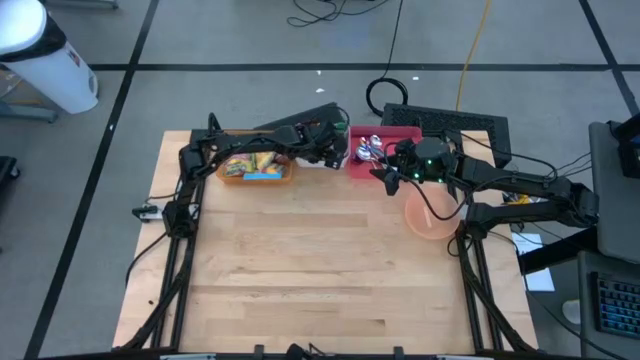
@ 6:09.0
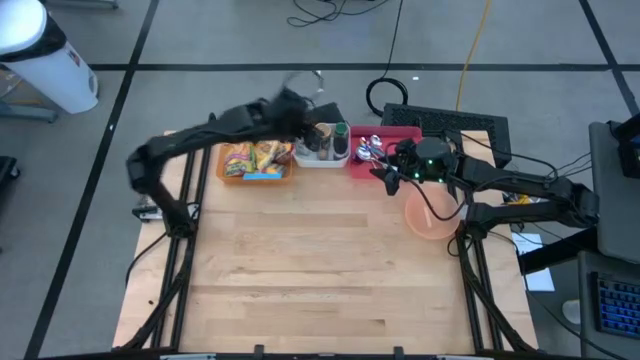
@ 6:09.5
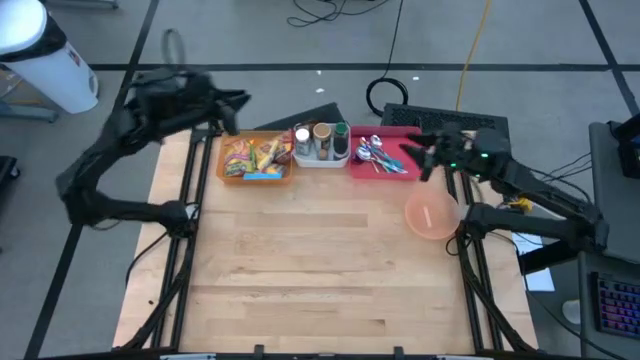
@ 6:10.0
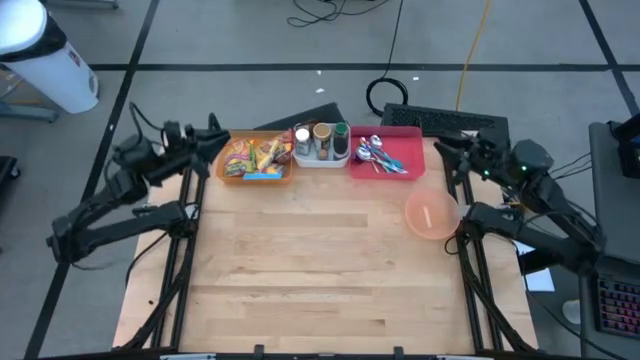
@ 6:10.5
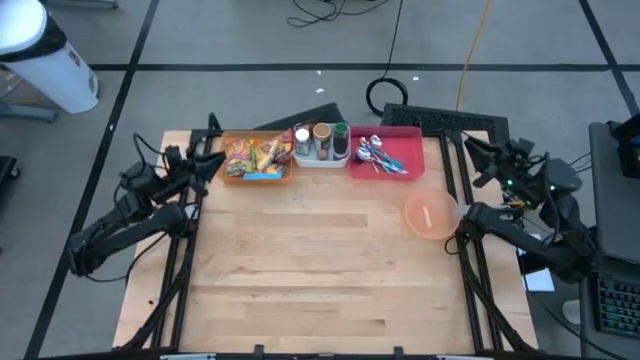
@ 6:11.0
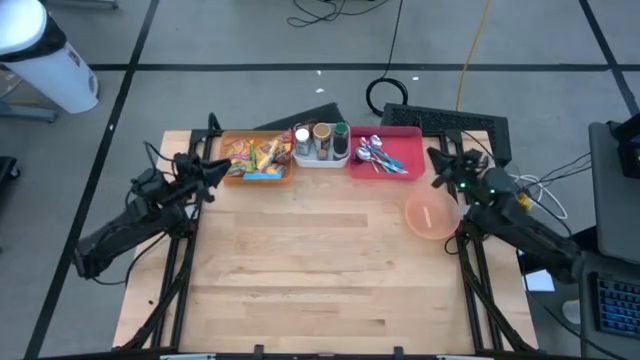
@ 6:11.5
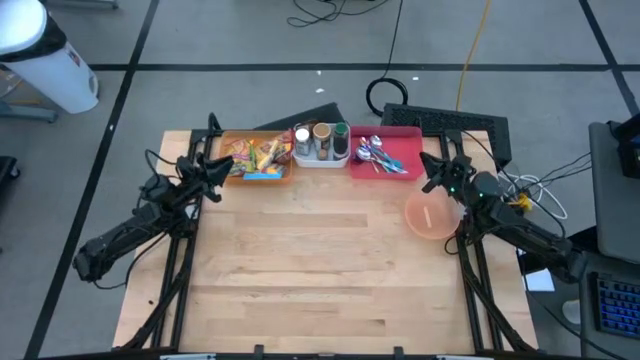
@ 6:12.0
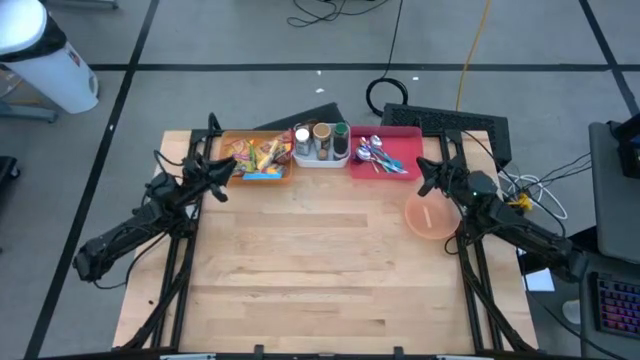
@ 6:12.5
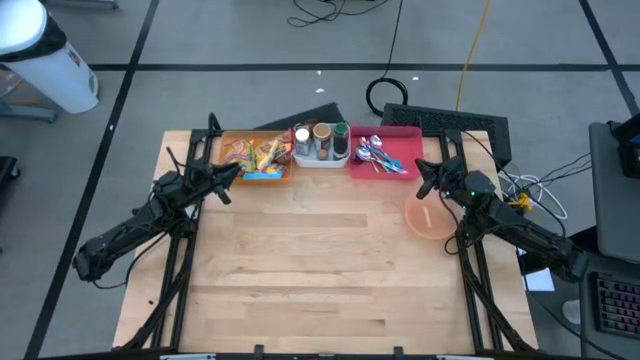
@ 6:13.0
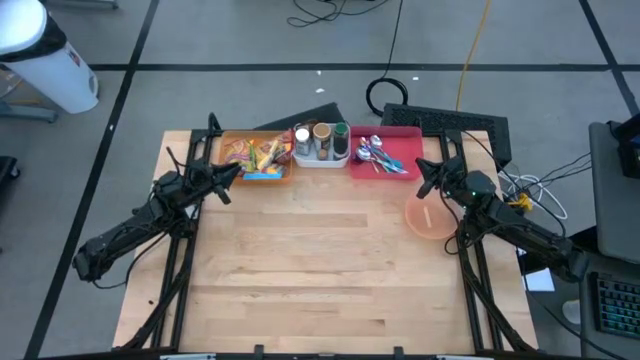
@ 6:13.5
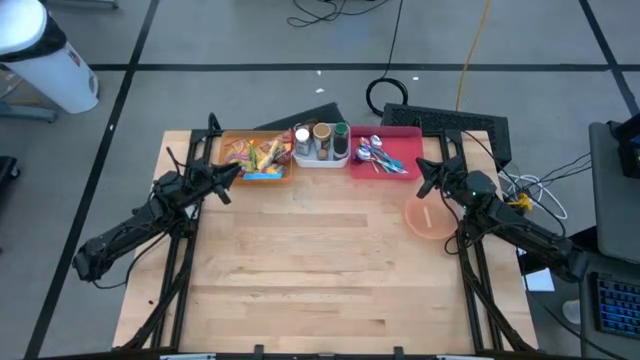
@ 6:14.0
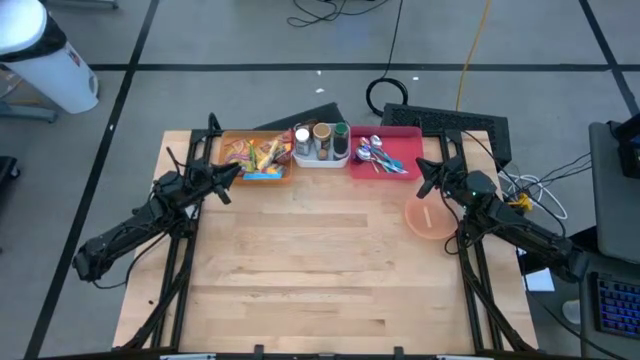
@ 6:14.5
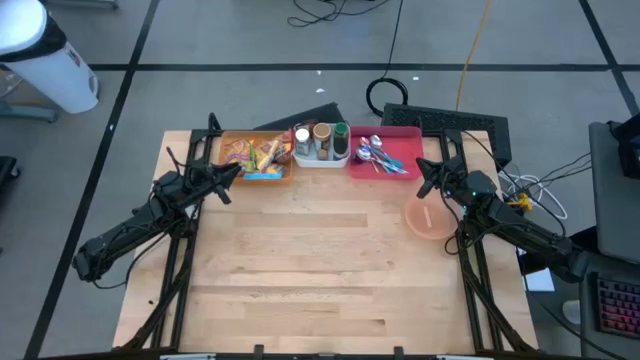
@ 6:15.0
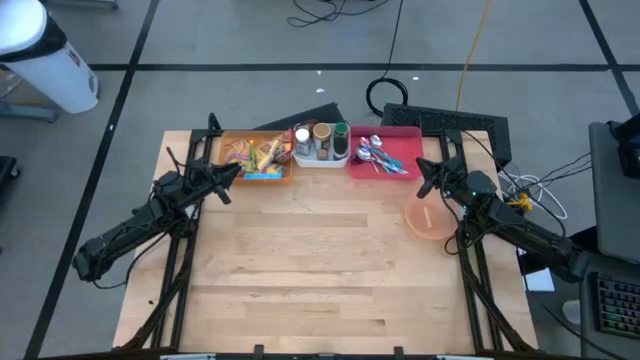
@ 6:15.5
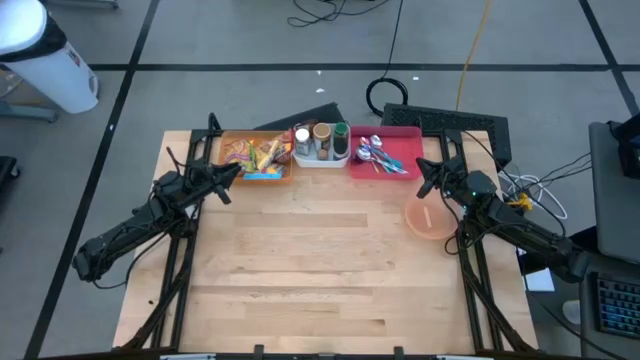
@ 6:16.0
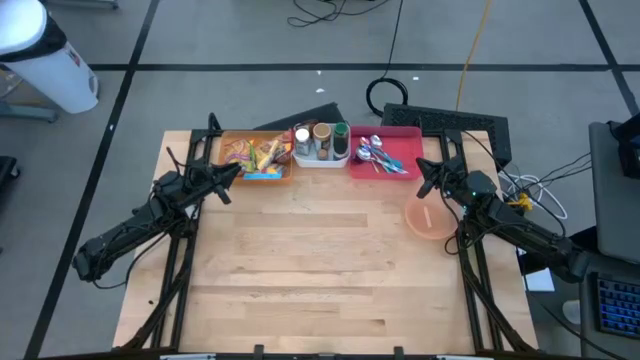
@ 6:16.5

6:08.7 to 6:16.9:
Task: Pick & Place Food Item
Return to Home Position
